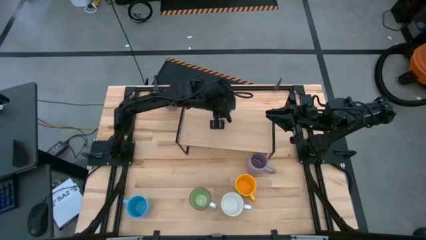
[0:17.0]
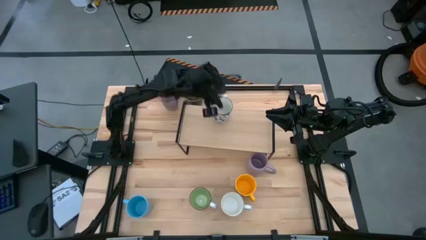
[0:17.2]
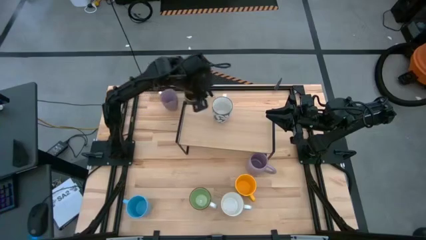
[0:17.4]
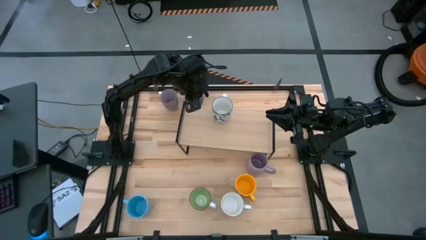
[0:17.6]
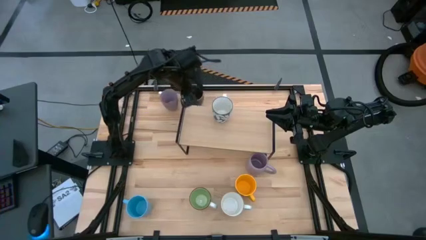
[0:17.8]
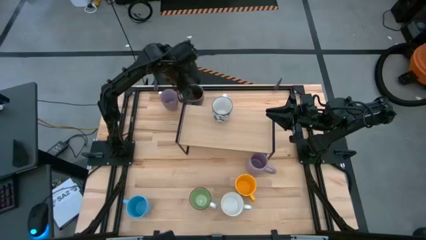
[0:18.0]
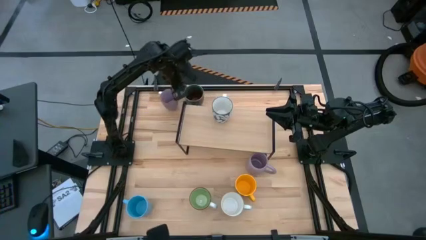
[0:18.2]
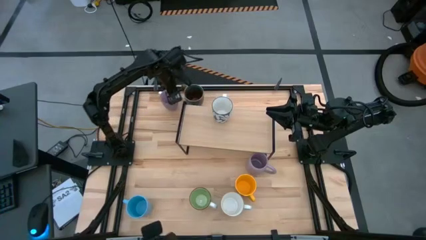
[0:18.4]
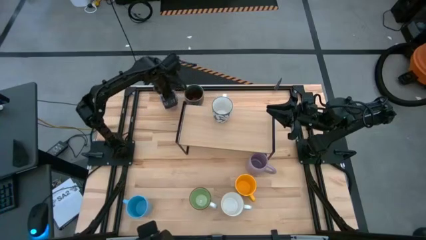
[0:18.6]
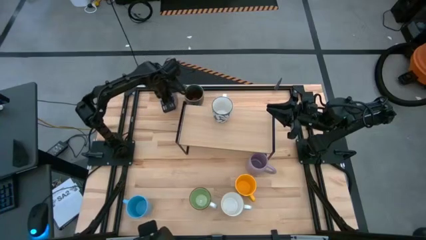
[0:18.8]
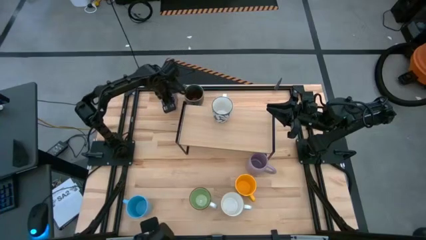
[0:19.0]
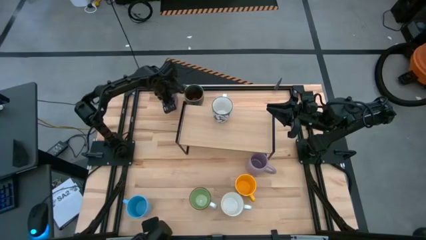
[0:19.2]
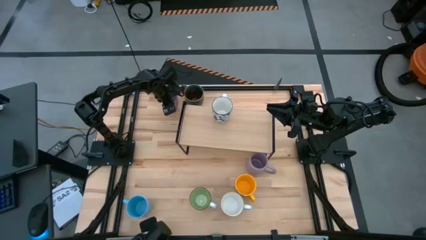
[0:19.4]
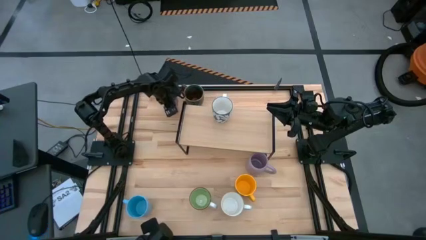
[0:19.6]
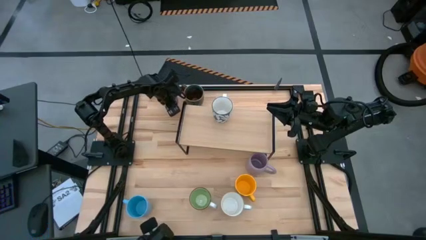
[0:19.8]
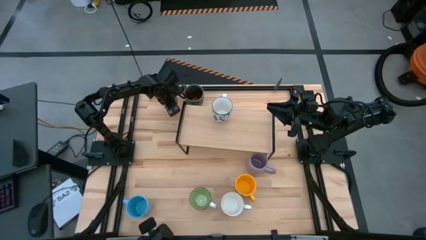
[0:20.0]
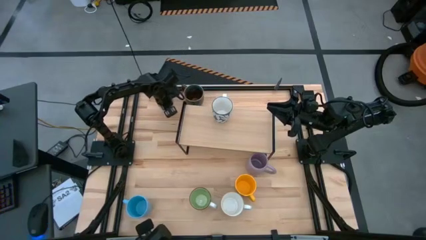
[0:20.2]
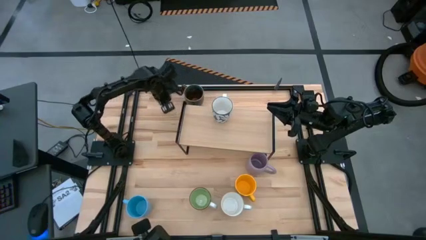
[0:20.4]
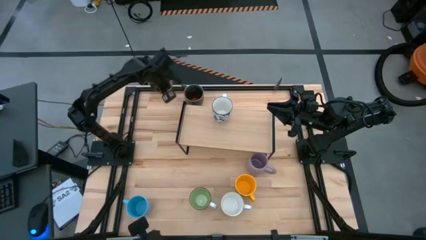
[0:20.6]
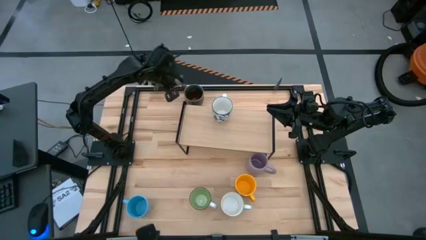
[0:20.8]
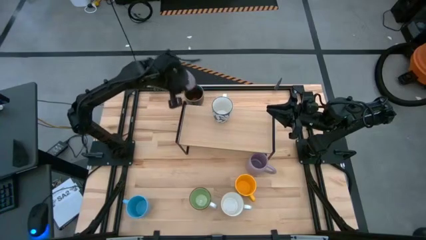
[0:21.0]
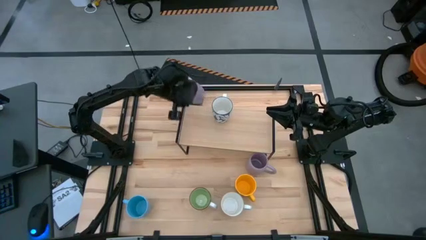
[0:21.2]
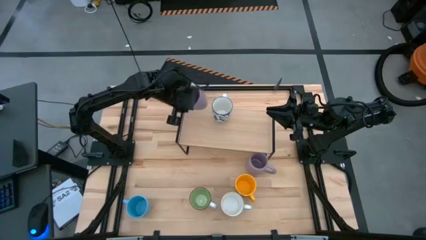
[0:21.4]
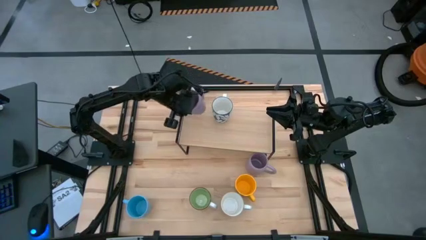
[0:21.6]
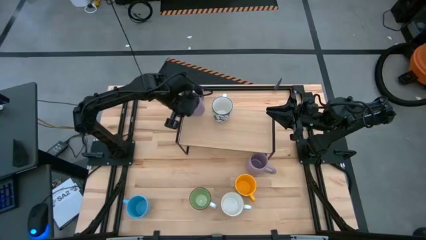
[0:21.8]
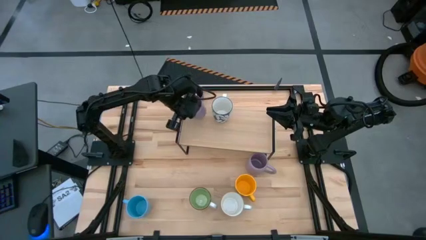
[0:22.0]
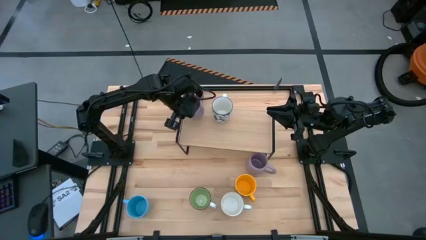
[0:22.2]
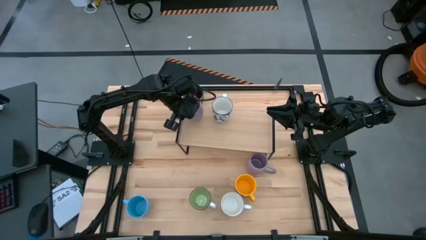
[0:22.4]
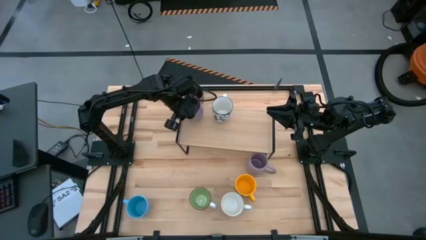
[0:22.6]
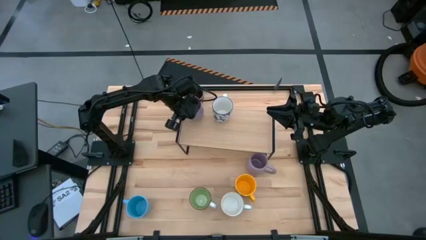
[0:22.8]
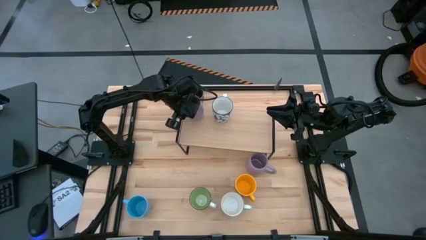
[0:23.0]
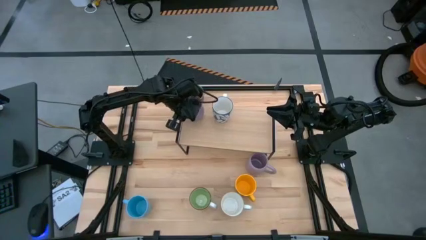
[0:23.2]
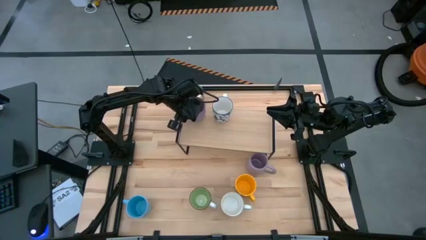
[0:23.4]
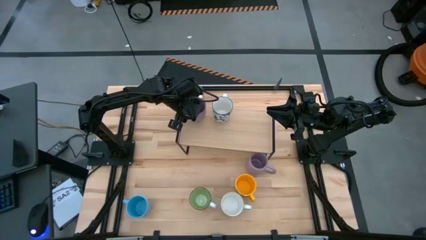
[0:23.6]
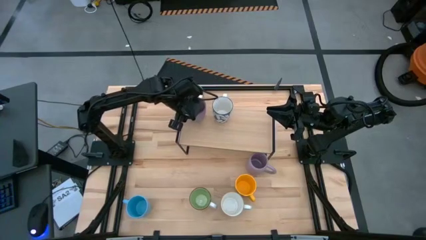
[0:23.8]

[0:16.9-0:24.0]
Task: Place coffee mugs
Put the violet patterned mug on the shelf

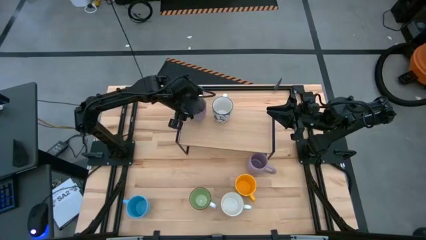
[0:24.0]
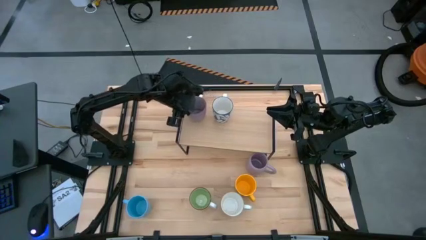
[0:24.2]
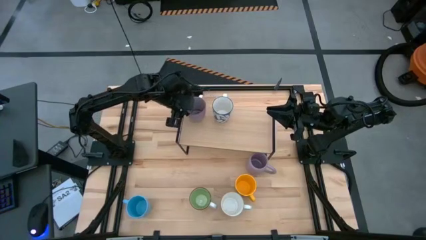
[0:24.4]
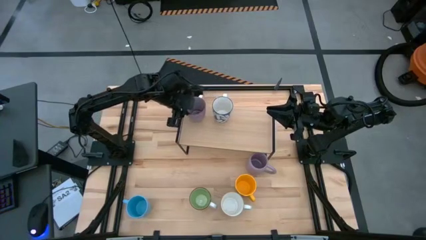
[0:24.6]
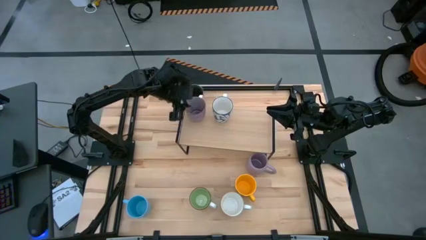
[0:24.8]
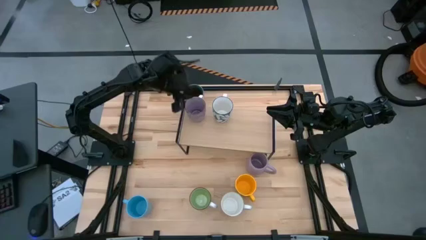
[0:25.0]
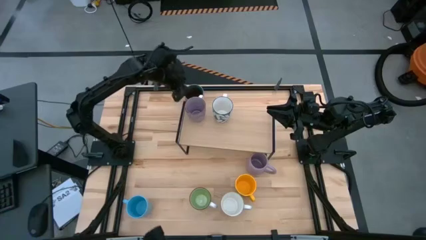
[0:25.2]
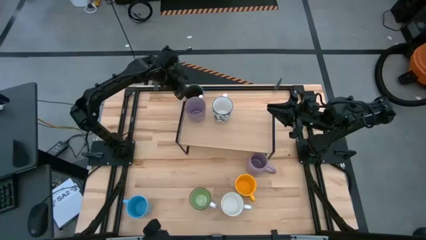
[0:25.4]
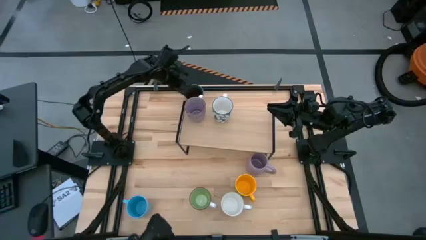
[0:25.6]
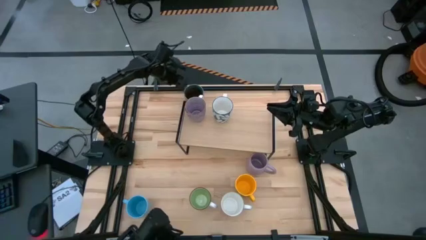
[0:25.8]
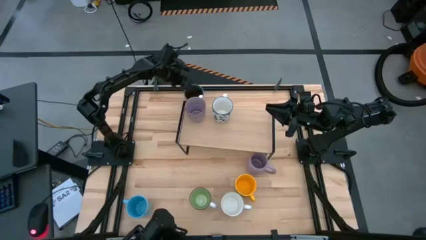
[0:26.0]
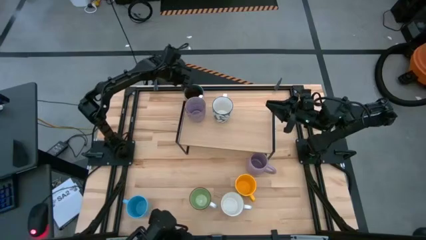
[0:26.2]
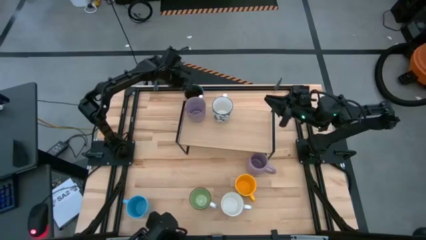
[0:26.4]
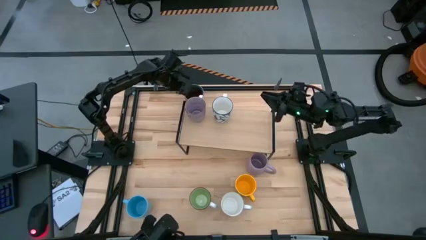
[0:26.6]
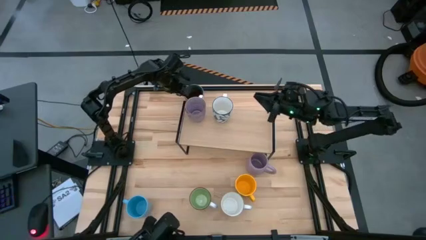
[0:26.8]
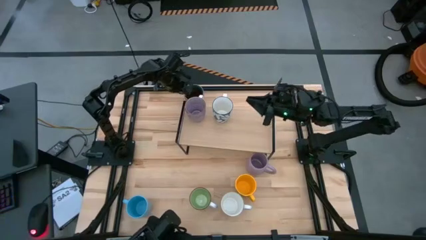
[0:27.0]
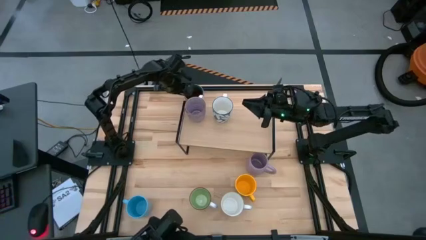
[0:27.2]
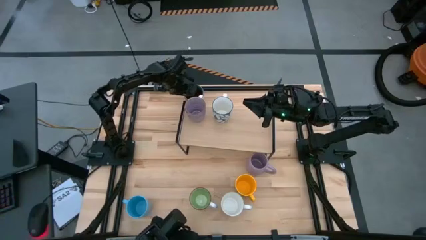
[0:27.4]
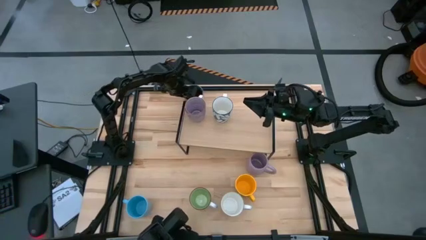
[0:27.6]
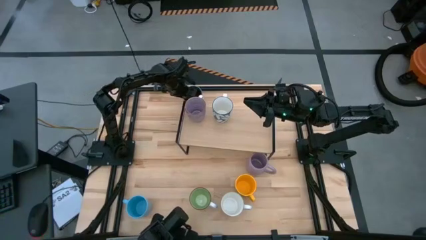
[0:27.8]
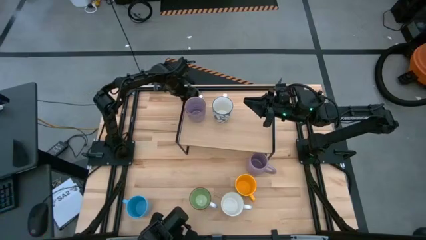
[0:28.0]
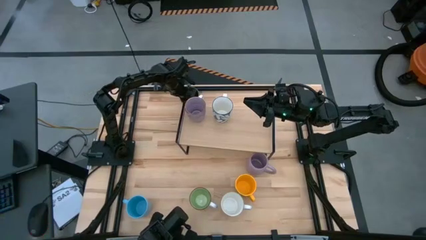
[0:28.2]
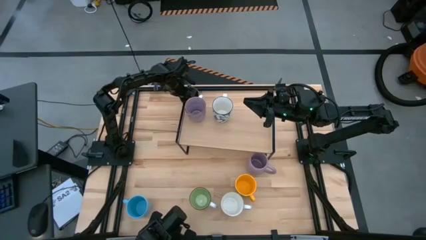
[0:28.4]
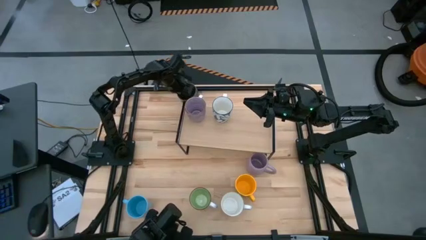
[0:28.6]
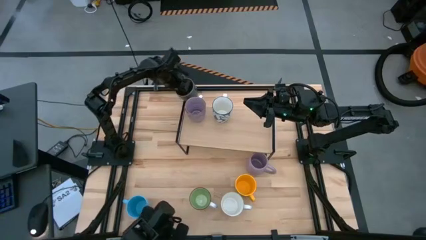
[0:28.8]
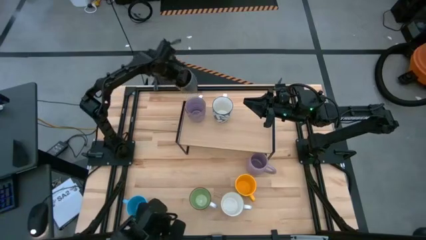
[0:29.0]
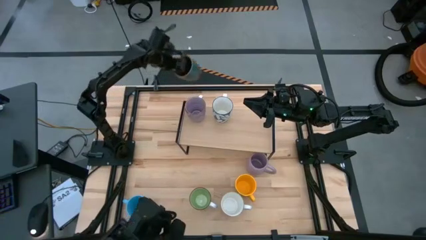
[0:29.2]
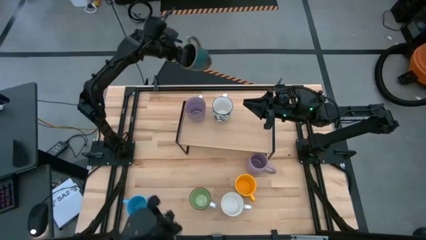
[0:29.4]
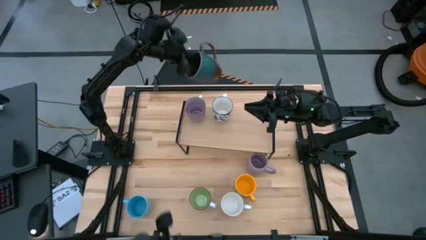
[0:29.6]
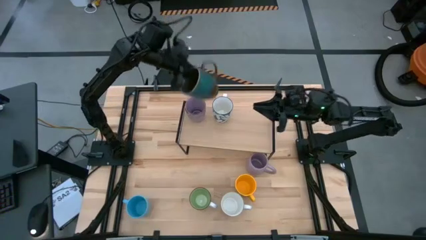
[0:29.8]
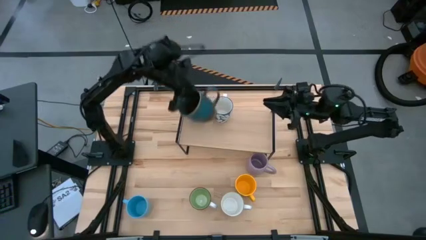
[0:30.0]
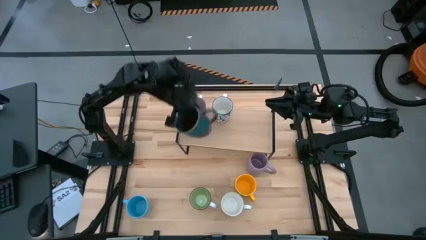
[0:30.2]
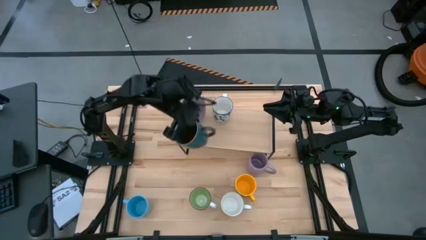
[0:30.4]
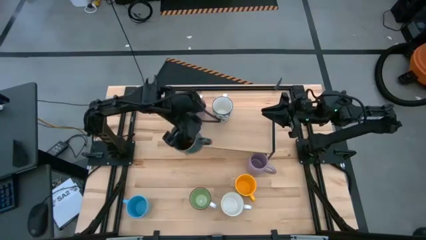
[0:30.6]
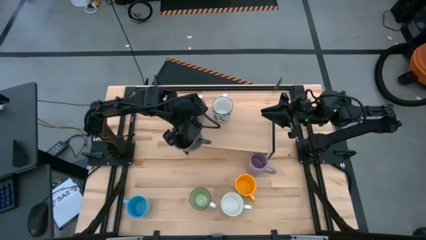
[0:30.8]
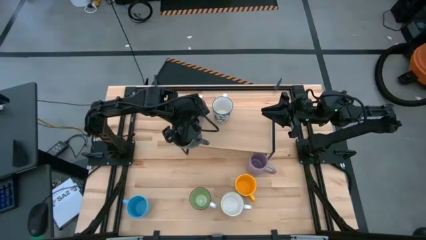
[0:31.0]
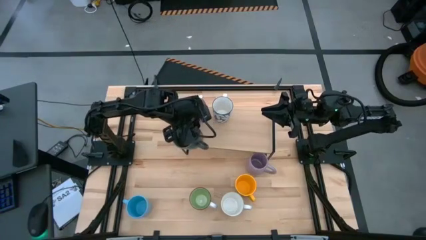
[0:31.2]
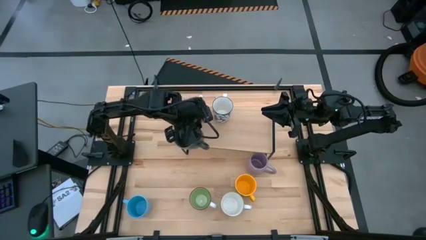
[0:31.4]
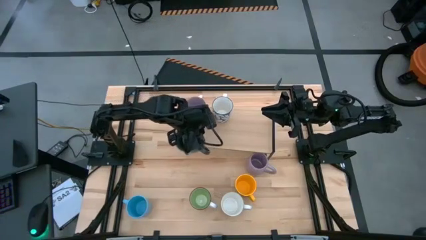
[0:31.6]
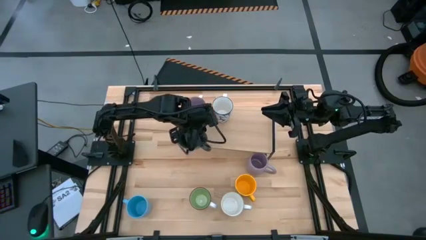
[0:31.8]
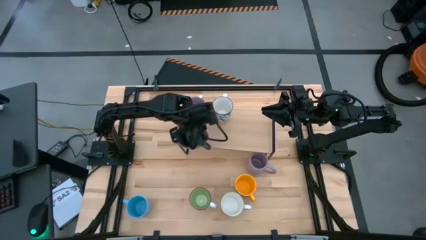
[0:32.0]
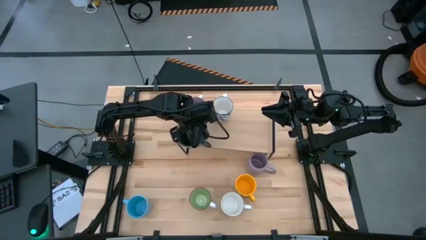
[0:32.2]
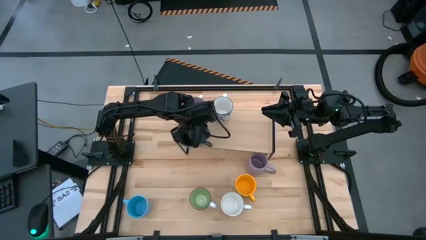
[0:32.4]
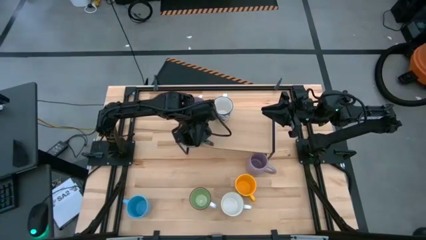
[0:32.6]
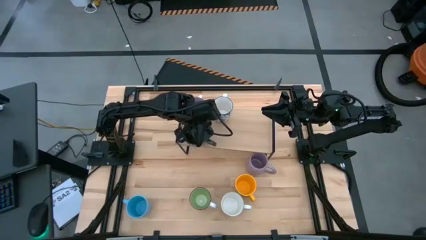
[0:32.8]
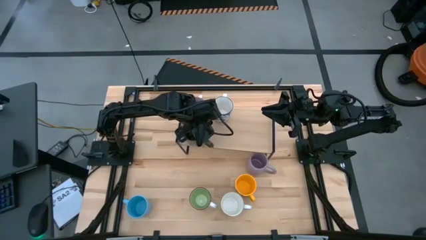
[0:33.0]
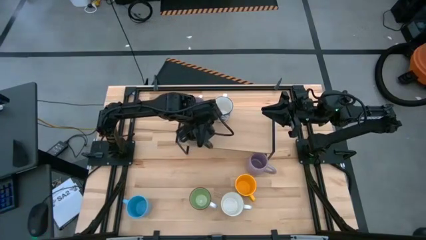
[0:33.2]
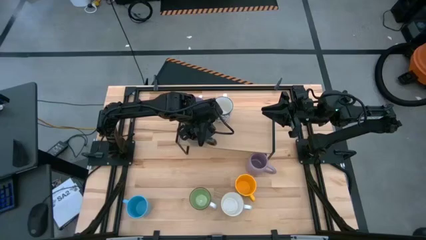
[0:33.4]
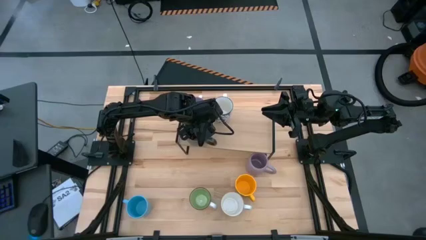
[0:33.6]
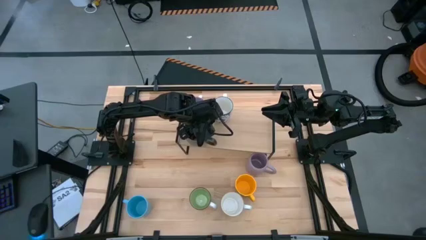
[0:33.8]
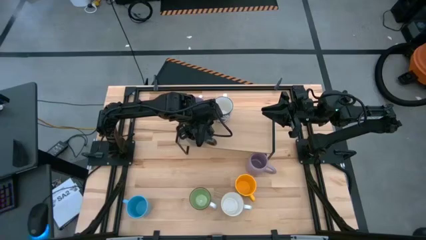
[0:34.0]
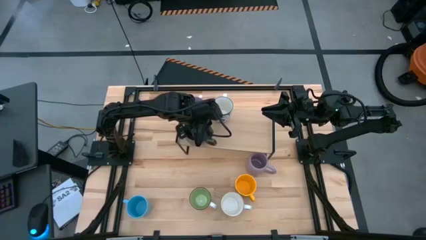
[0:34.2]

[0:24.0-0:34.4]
Put the green and brown mug on the shelf
